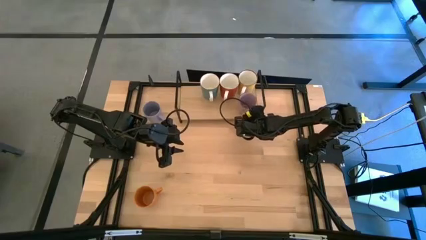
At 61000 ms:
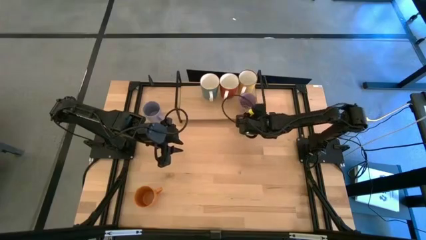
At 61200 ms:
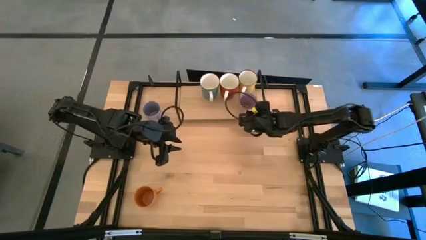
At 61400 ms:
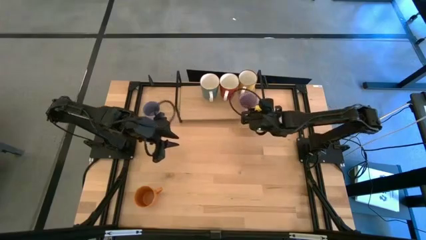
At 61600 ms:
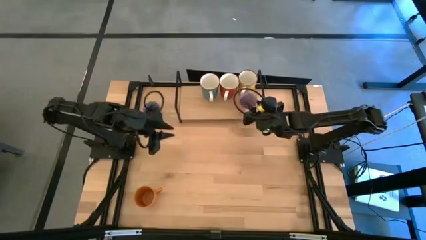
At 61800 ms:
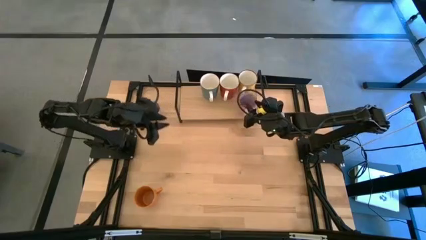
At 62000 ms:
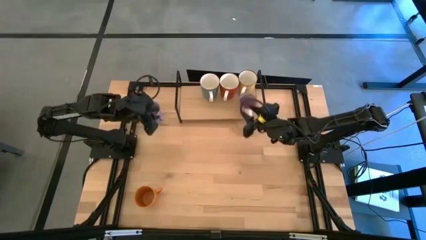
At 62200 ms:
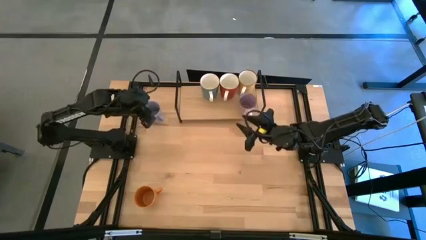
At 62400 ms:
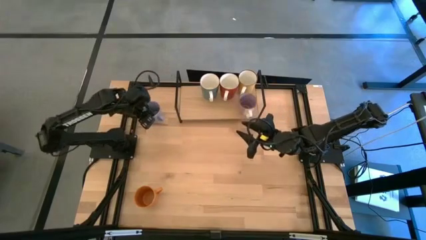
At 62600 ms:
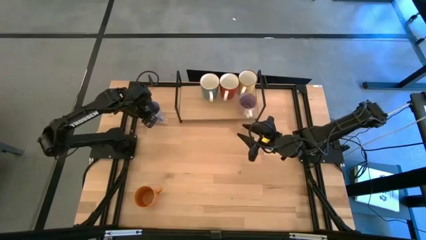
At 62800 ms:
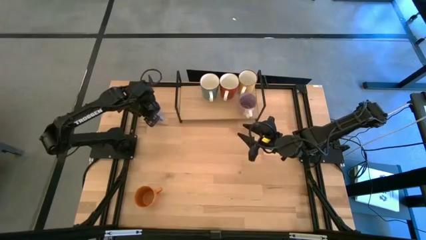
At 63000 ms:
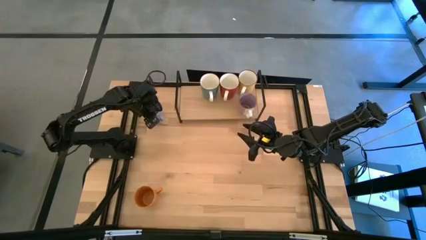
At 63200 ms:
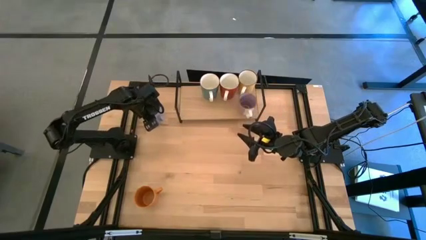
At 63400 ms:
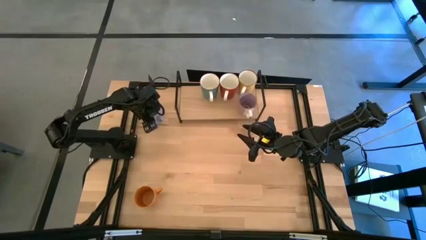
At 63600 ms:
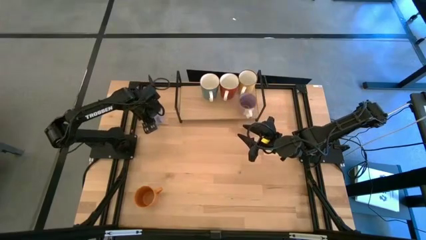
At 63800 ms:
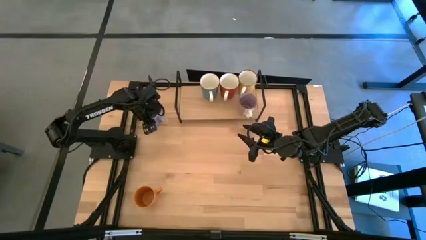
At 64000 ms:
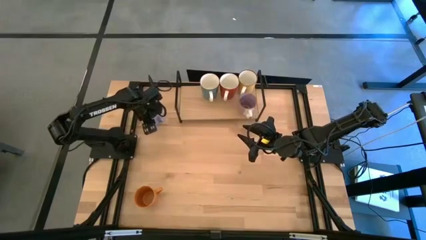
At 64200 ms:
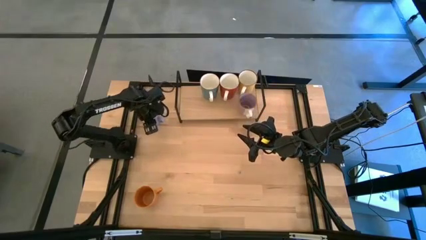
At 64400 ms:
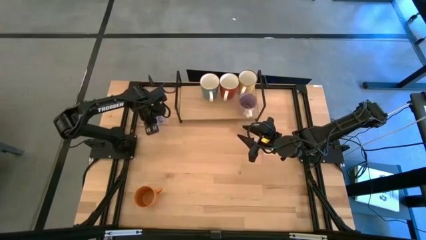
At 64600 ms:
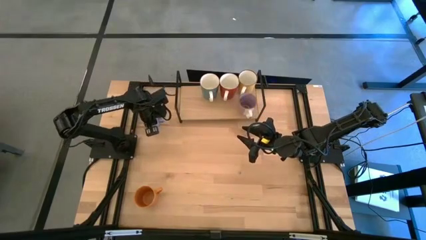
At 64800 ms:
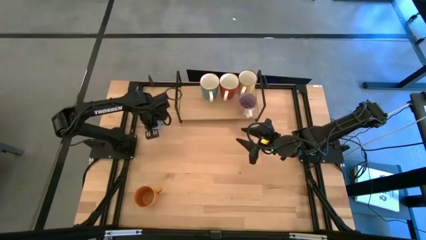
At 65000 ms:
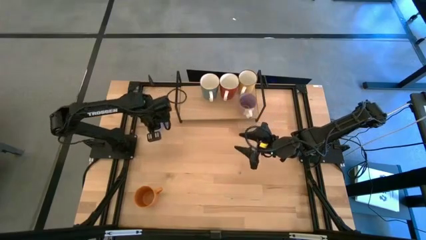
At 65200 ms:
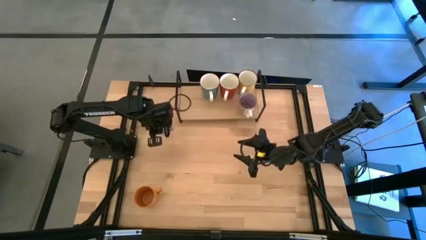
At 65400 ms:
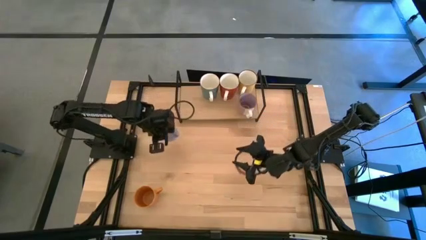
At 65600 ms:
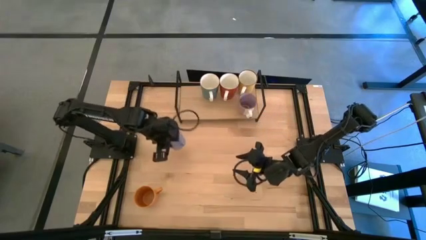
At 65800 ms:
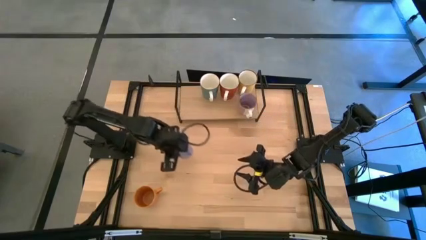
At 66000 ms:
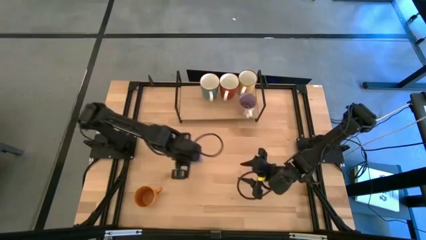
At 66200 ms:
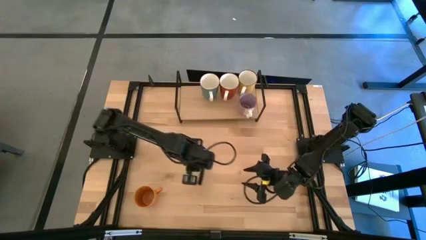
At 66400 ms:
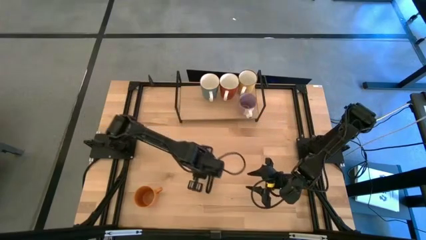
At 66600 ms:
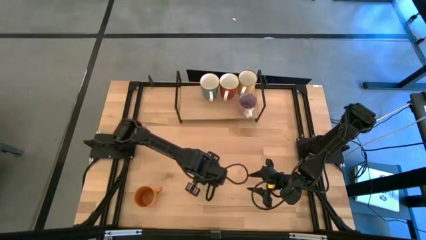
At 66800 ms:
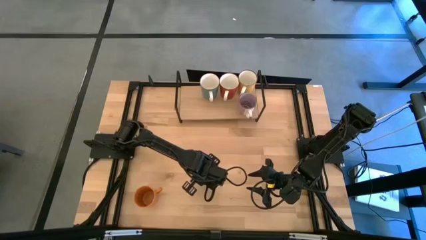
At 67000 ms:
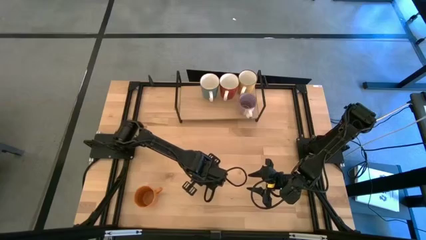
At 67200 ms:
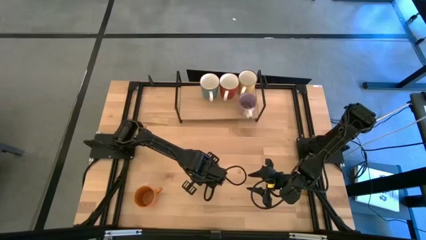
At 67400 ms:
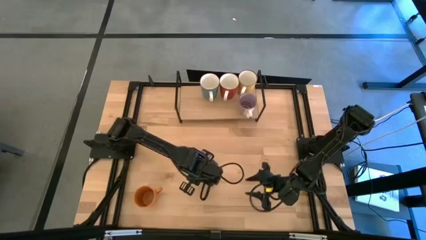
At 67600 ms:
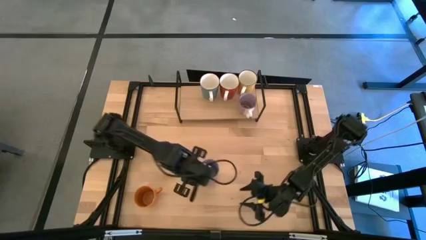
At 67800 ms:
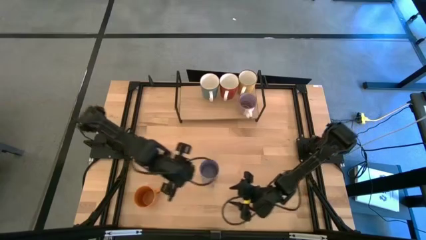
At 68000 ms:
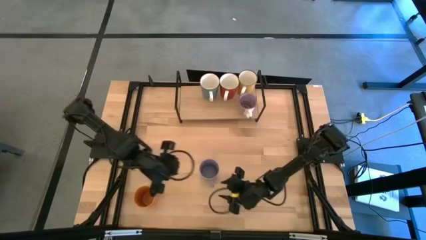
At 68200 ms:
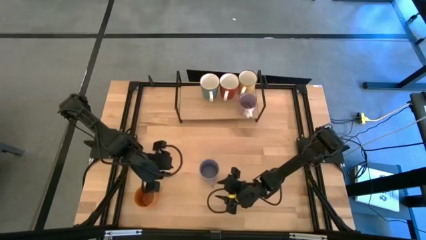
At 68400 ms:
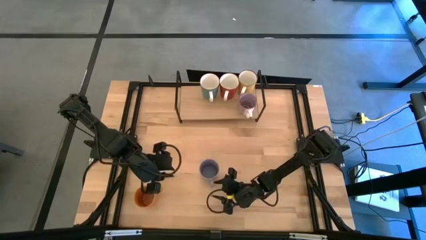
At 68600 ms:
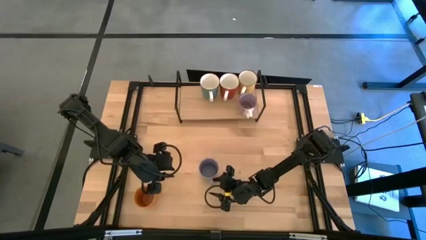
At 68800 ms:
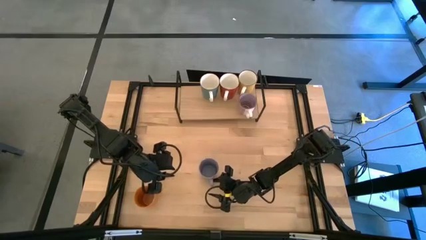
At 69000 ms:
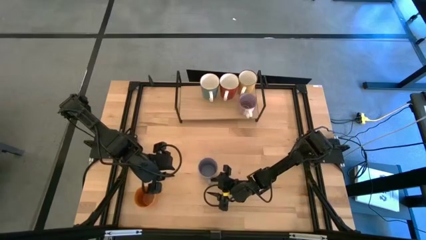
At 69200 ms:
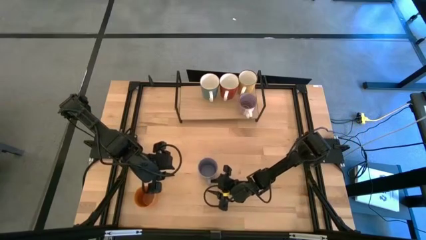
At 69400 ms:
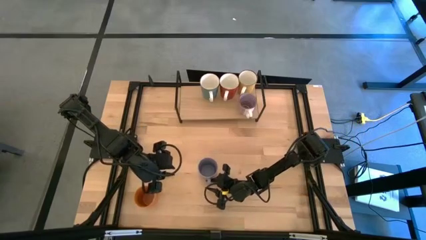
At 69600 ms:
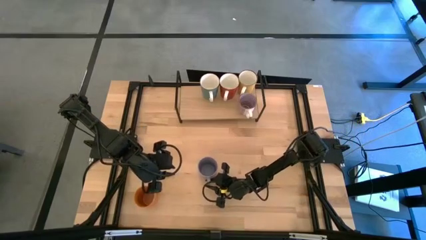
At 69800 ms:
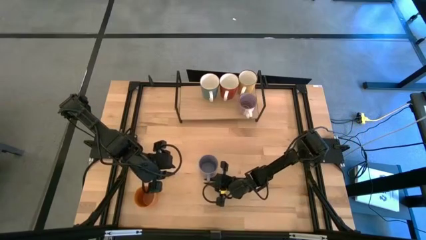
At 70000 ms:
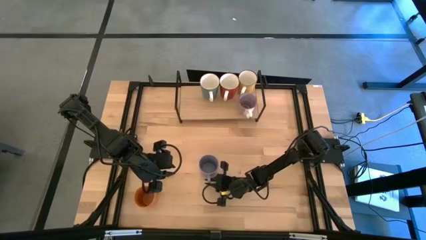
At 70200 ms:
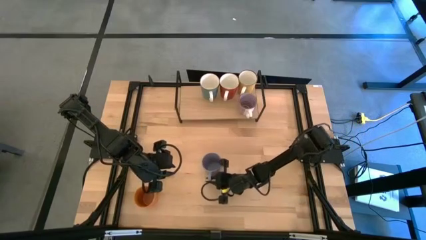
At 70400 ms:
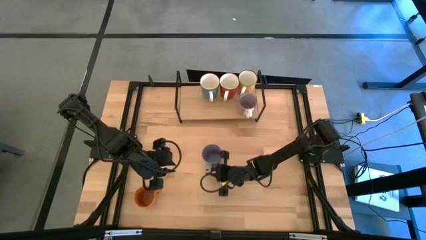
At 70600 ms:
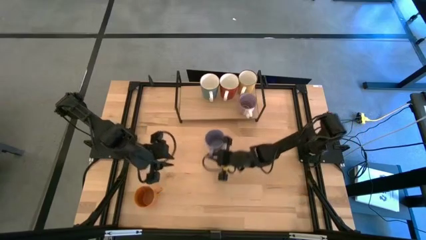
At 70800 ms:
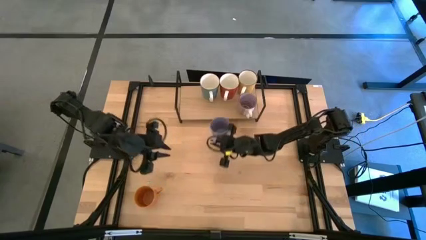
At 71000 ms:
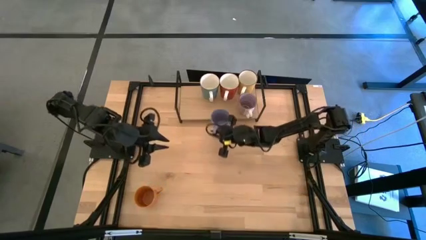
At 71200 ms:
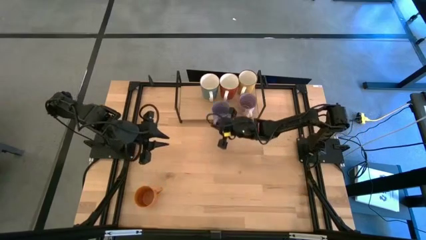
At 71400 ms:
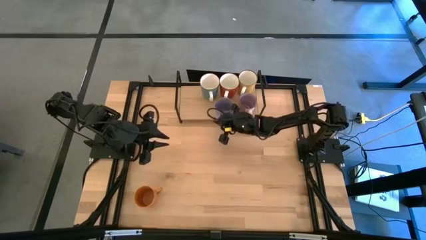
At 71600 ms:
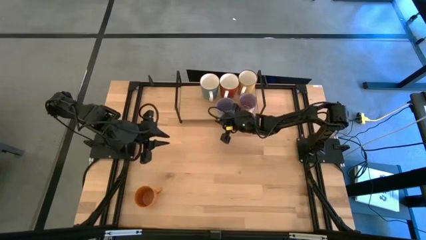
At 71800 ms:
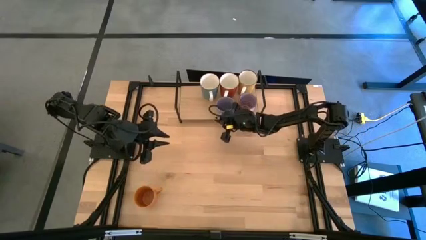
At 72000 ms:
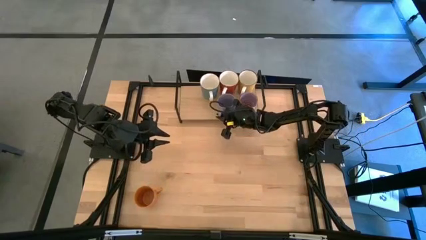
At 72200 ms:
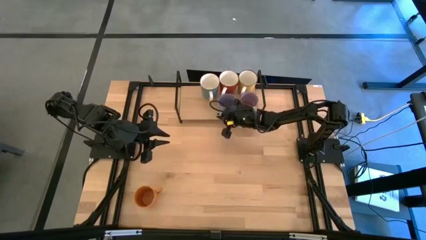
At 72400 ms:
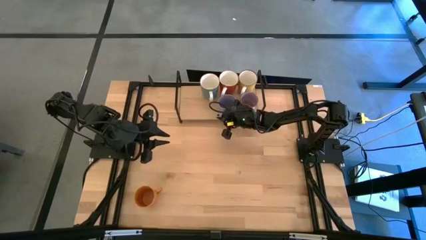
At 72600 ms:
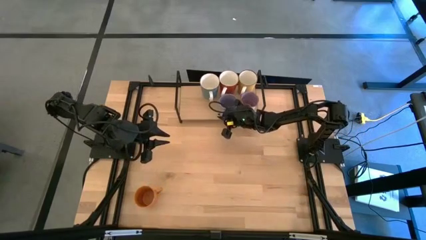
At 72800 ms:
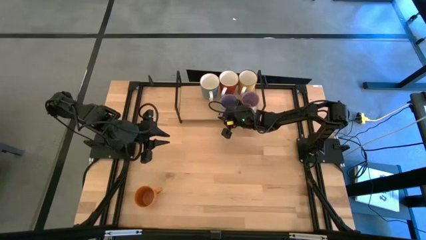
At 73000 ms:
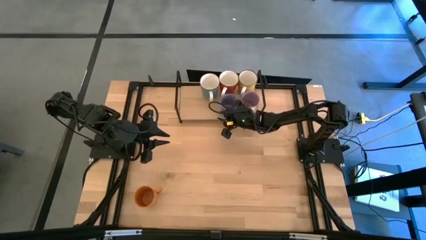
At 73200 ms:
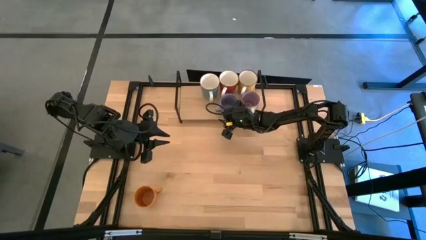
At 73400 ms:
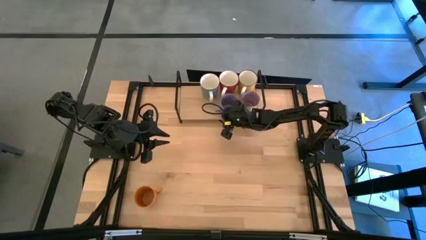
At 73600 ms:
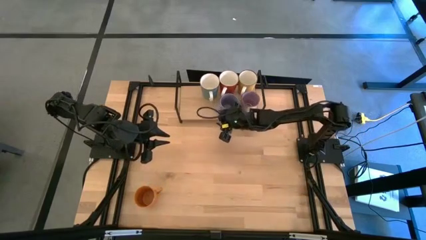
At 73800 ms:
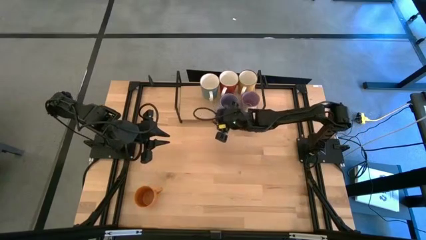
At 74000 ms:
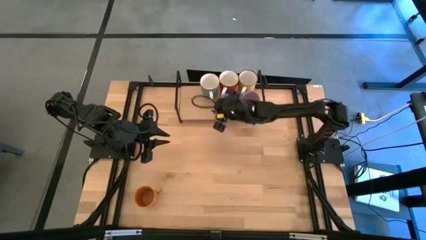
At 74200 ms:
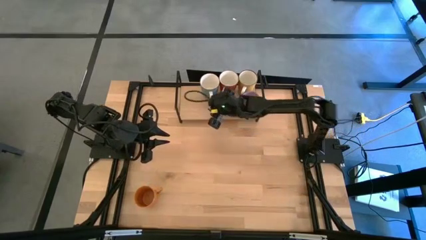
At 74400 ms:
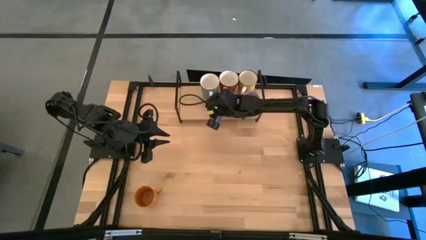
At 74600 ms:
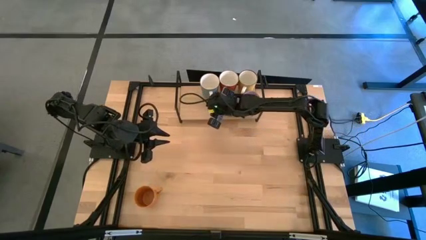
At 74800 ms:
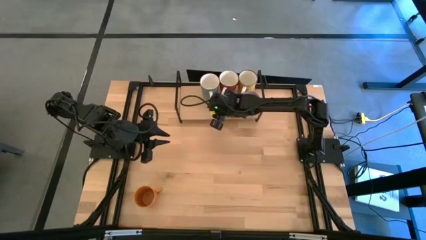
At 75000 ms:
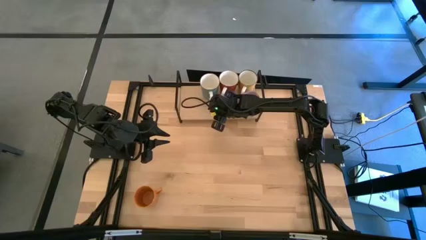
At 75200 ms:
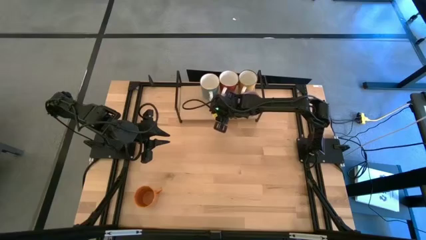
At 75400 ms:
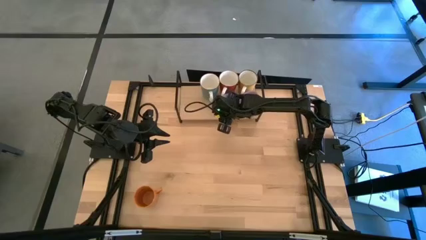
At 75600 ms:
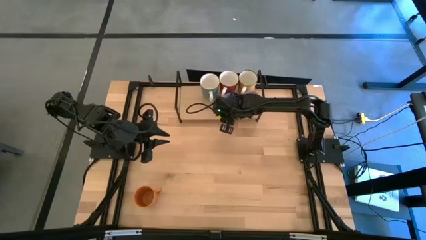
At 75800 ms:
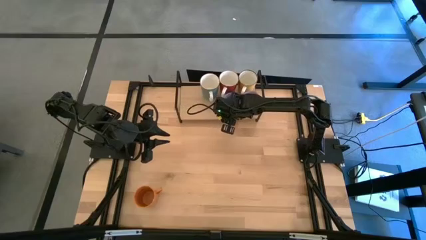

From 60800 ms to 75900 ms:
Task: Place coffee mugs
Put the blue mug on the shelf
